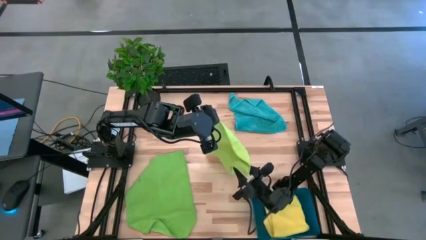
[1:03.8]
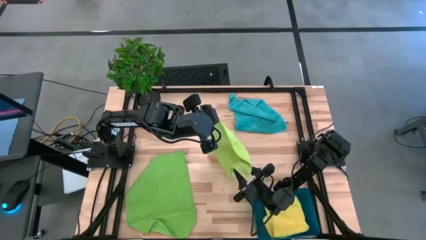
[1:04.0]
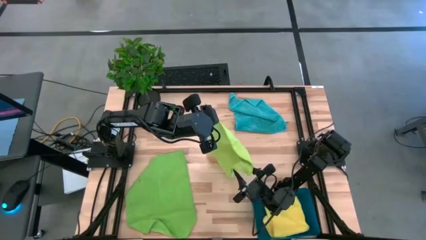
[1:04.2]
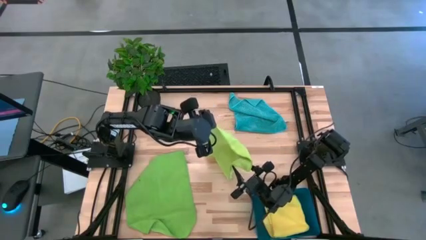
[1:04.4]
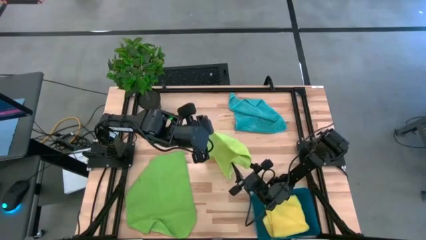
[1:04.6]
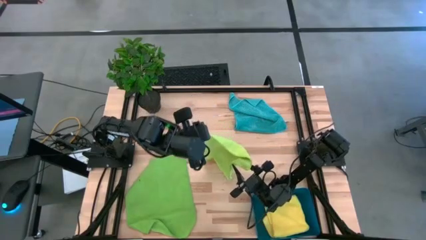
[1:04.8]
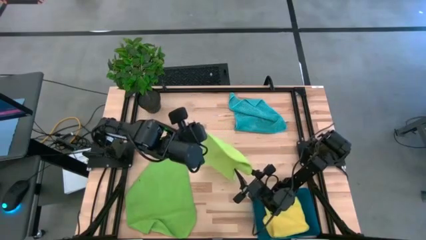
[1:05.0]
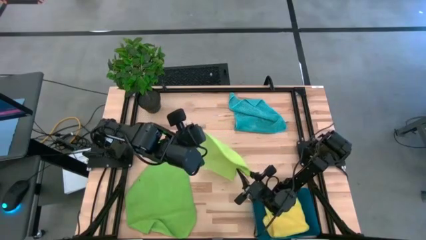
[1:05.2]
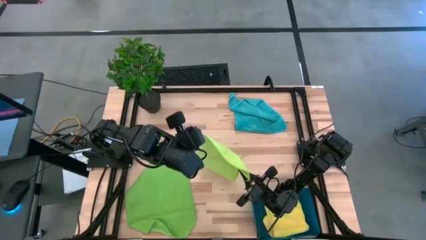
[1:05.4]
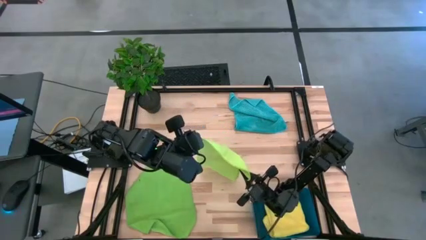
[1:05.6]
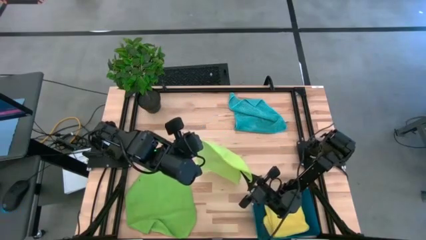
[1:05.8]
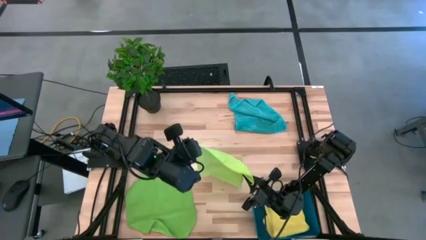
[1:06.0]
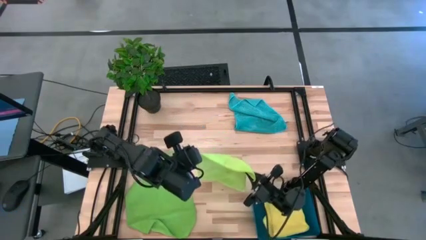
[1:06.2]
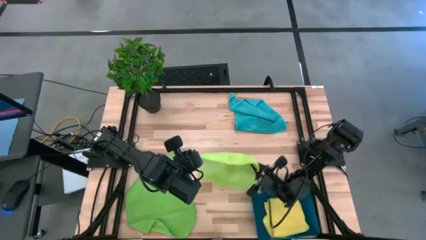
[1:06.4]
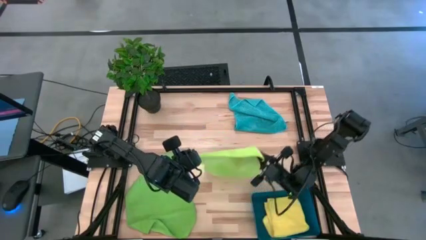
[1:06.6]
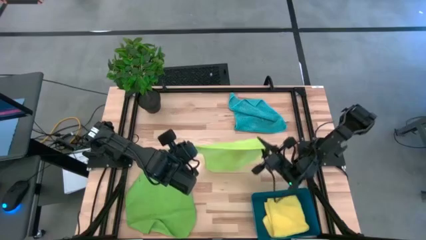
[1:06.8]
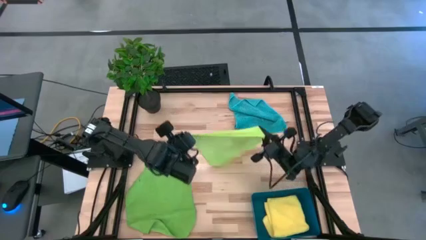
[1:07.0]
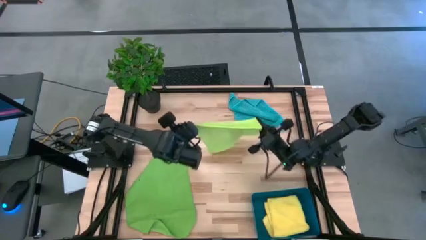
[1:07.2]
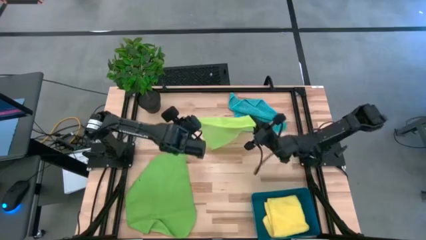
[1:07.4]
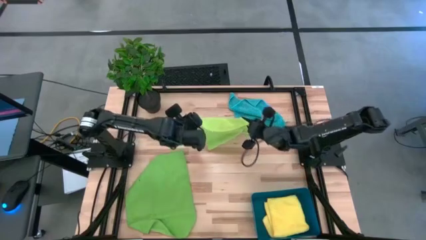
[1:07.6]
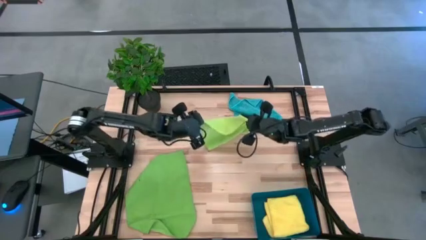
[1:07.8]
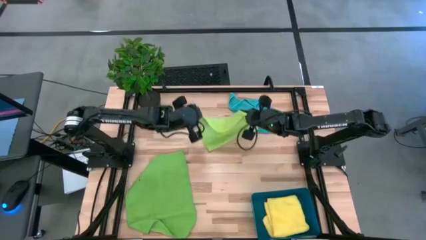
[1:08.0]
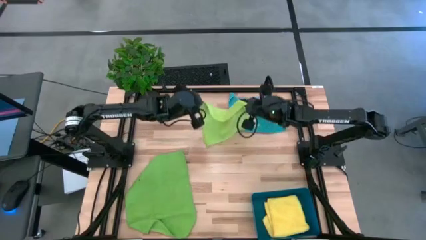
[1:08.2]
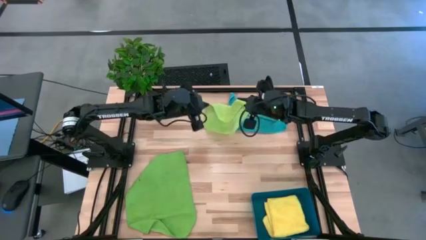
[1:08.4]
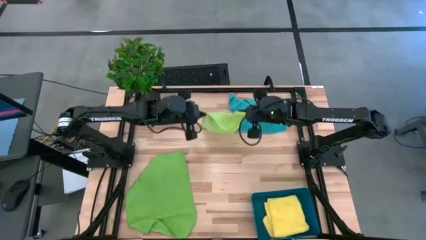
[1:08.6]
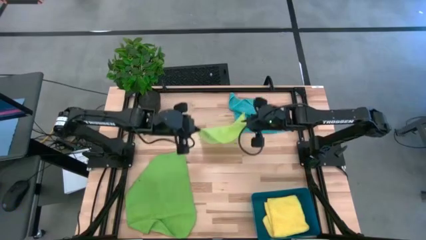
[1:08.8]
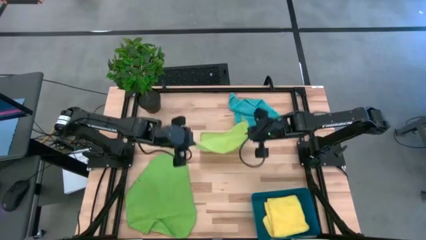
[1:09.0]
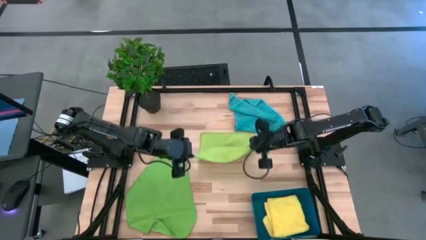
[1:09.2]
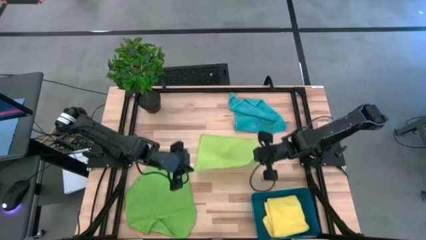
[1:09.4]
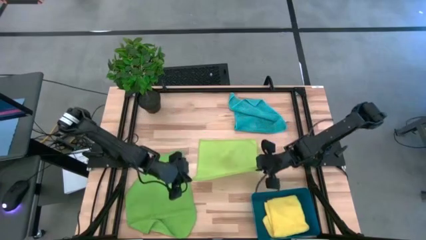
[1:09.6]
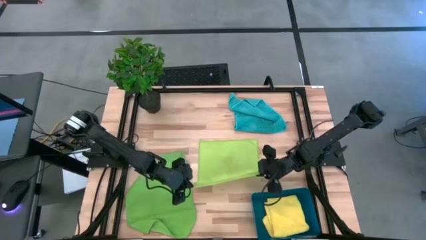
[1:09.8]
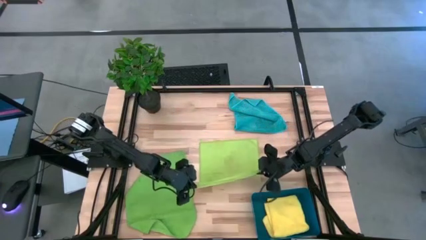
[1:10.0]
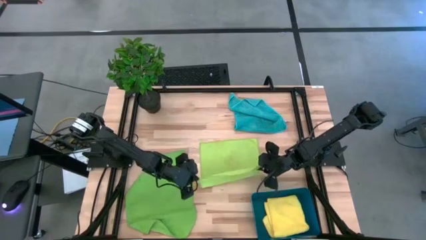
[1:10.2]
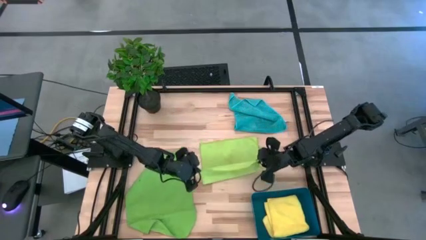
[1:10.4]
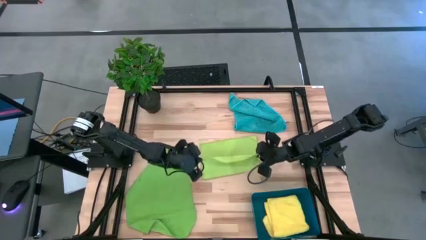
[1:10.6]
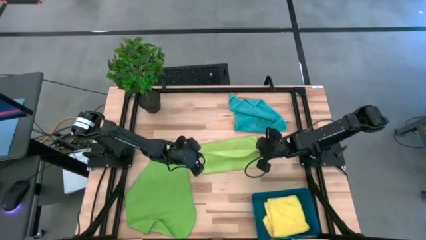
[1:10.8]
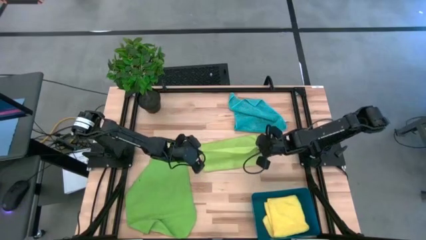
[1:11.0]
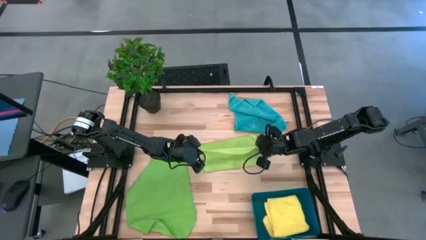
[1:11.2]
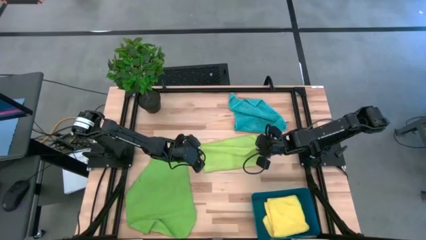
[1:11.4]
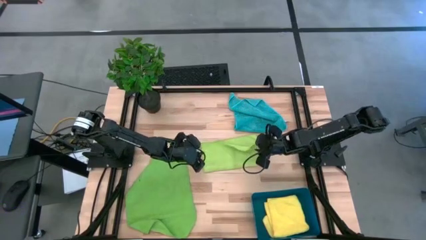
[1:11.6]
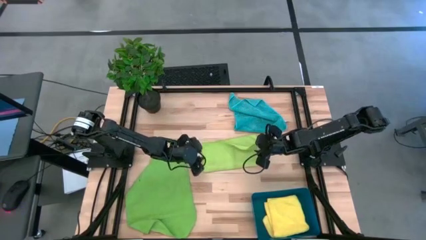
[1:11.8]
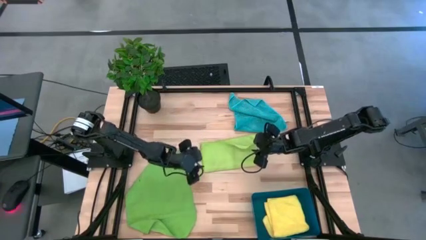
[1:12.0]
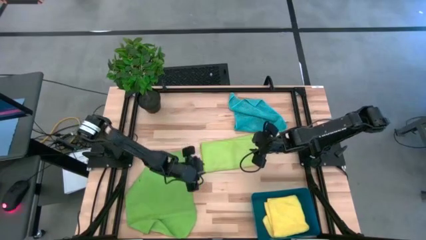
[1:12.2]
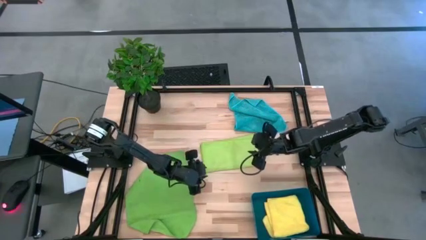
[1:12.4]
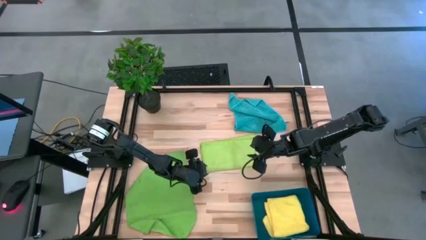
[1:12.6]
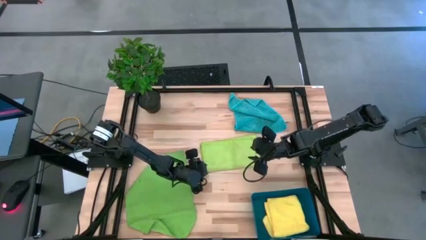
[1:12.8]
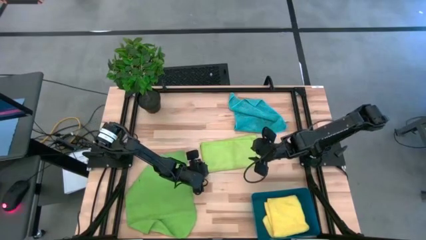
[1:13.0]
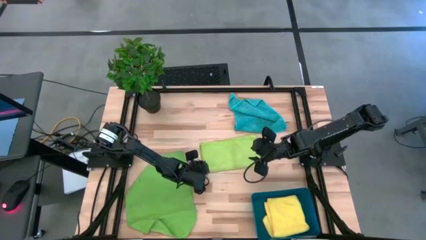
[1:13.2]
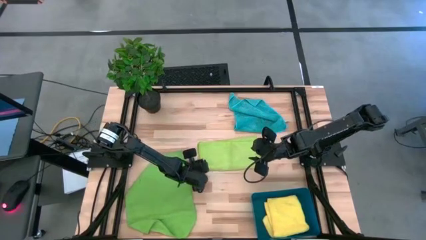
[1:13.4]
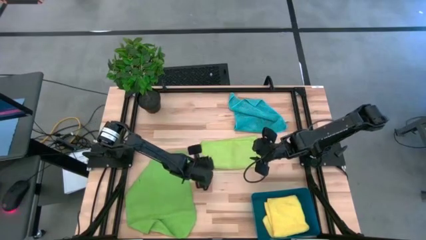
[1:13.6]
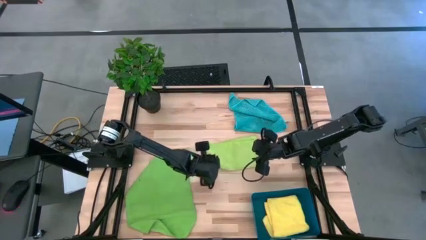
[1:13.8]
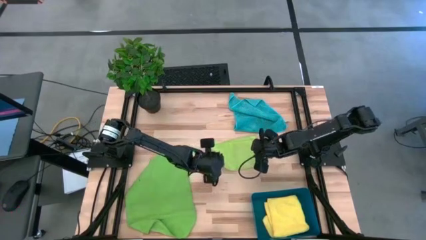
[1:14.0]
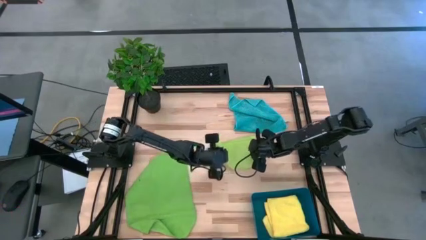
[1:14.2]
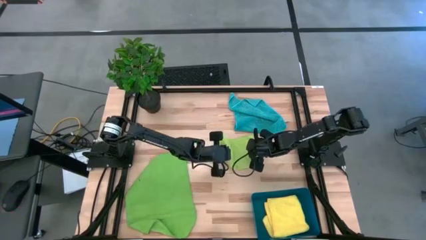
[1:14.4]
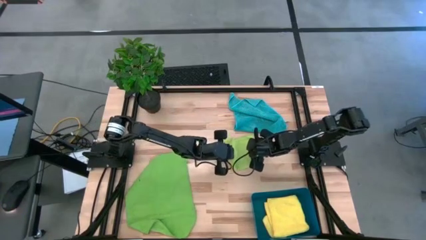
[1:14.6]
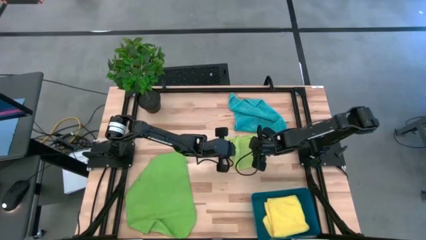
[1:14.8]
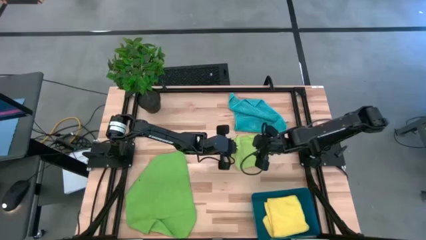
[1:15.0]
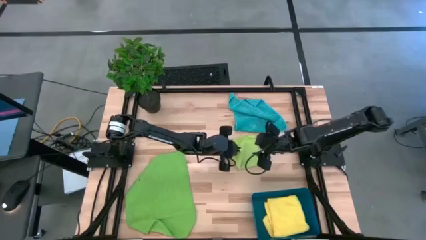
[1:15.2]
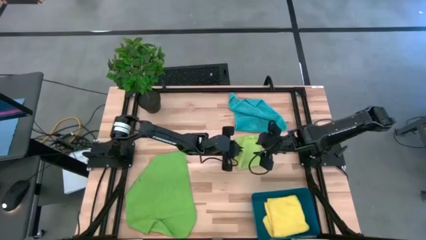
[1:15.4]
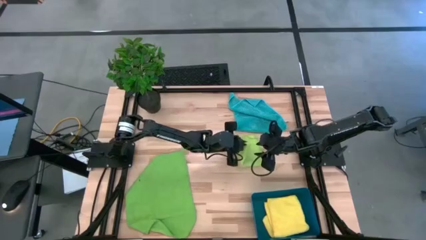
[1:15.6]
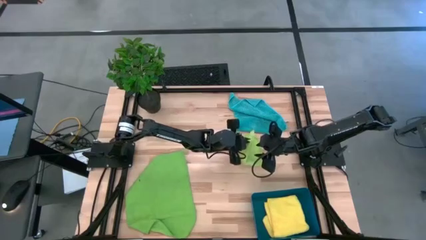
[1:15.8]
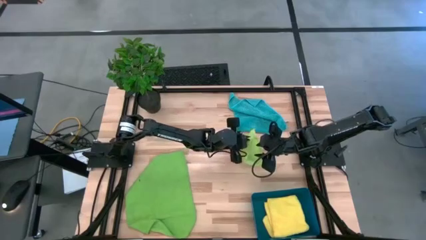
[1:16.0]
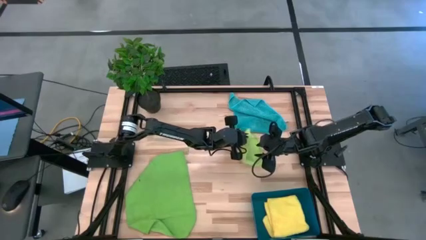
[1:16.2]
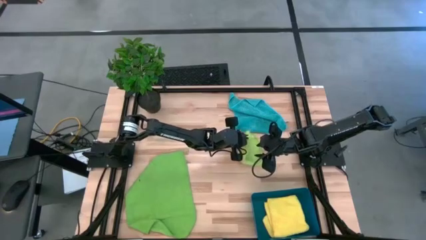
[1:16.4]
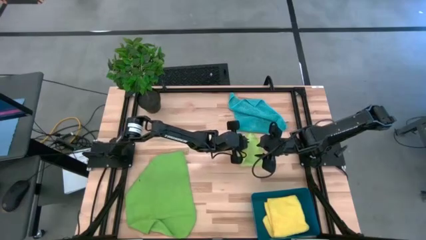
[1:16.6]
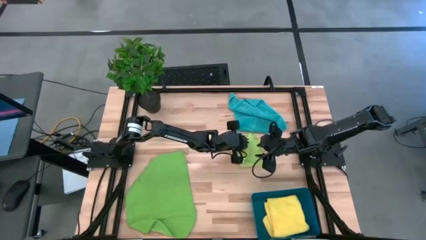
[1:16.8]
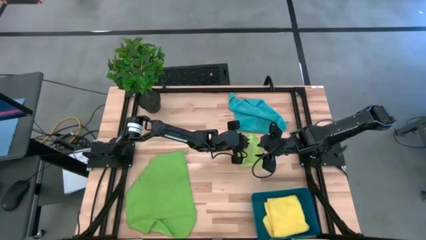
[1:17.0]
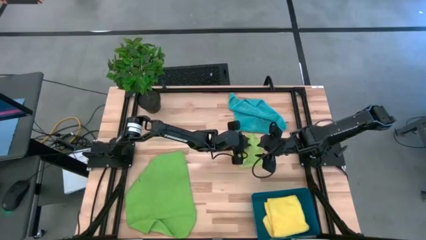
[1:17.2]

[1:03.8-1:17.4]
Task: Fold microfiber towels
Fold the light green towel

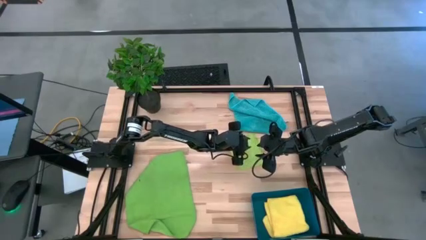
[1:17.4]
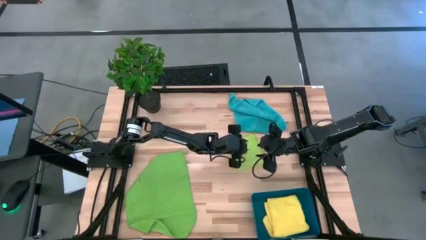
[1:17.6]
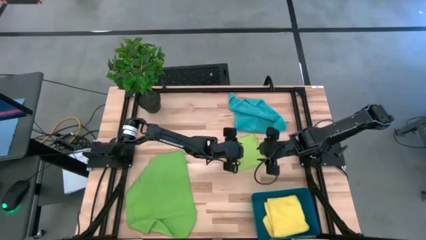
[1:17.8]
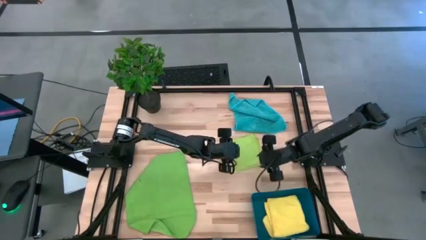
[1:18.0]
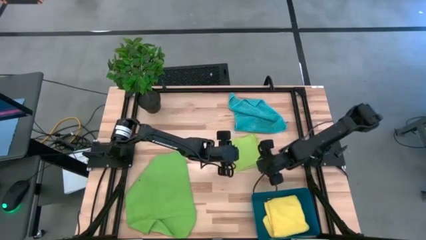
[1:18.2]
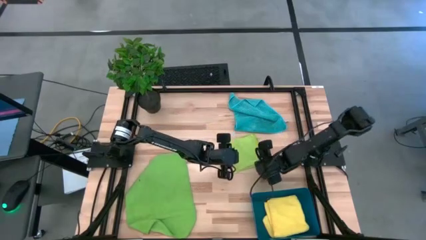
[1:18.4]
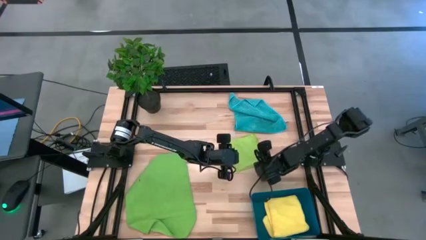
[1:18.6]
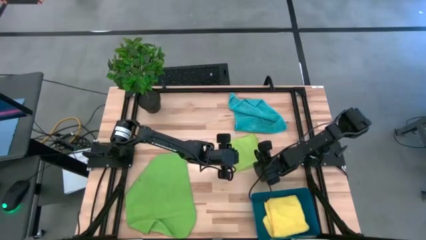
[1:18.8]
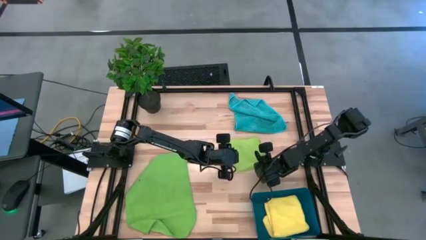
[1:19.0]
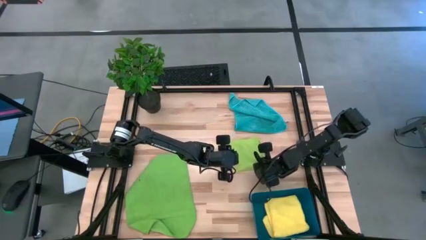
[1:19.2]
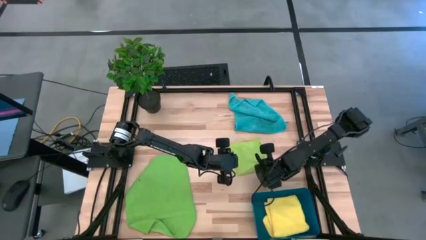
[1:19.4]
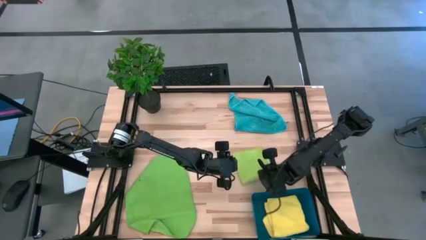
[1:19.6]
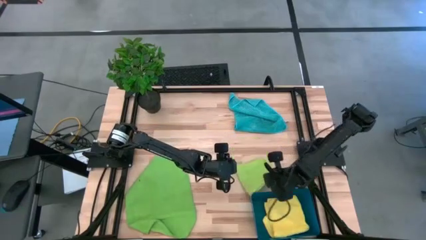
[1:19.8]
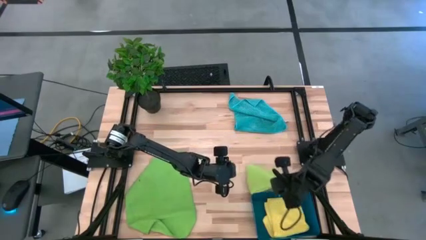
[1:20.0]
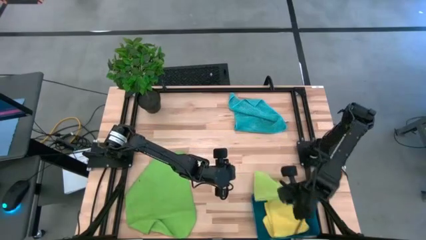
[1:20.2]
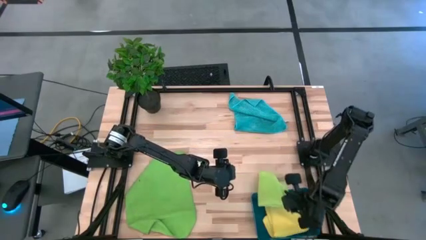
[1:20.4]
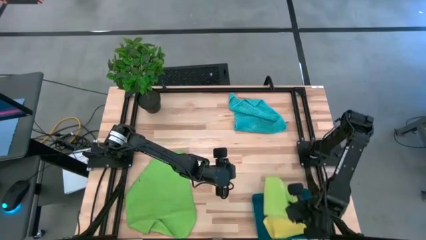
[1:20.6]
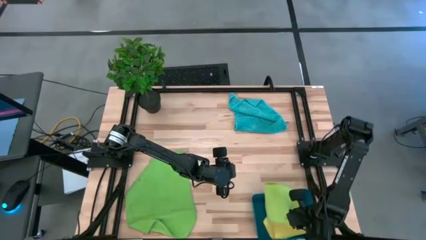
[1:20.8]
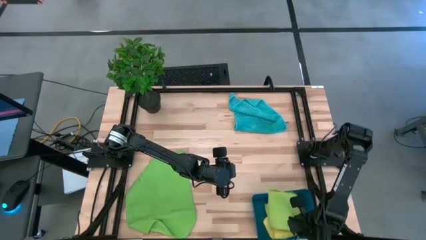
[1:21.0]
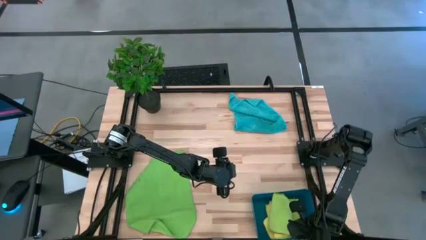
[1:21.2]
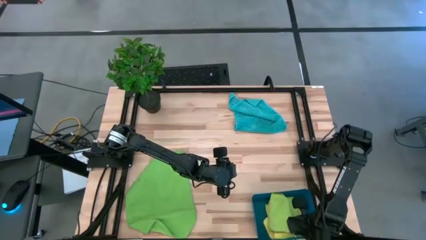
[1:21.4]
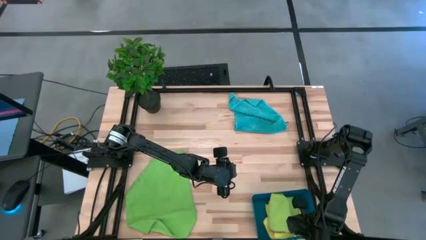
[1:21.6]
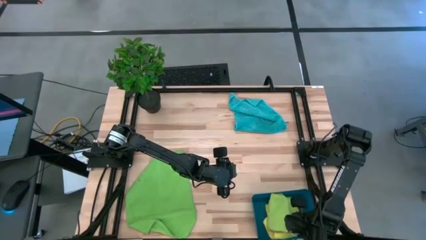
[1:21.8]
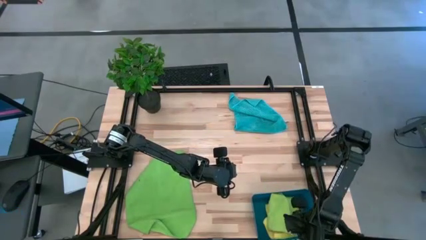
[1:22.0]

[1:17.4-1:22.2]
Put the folded light green towel into the bin
